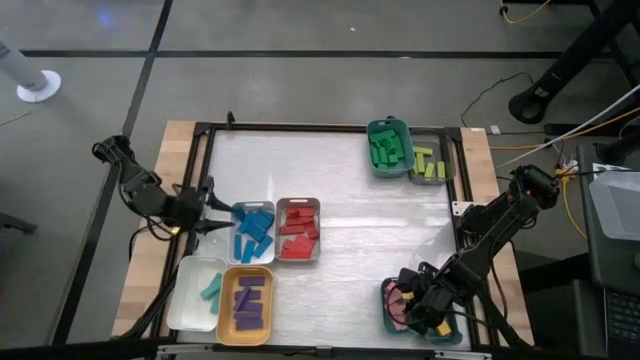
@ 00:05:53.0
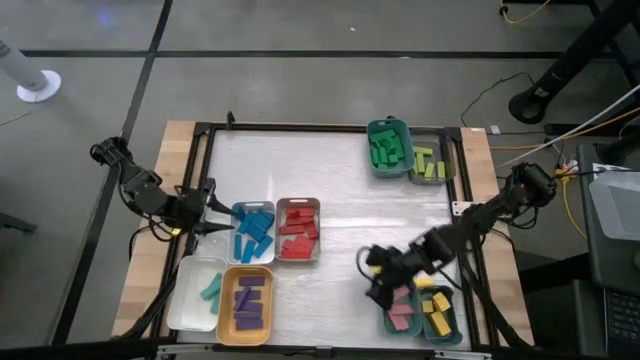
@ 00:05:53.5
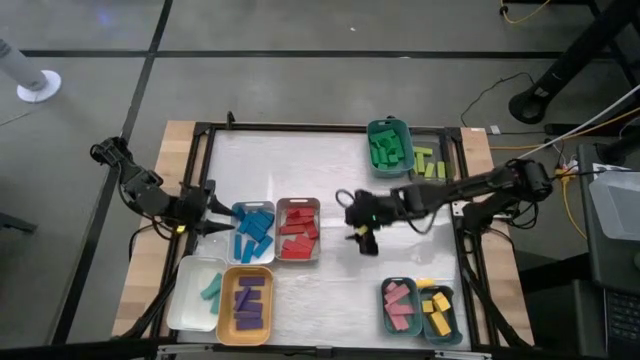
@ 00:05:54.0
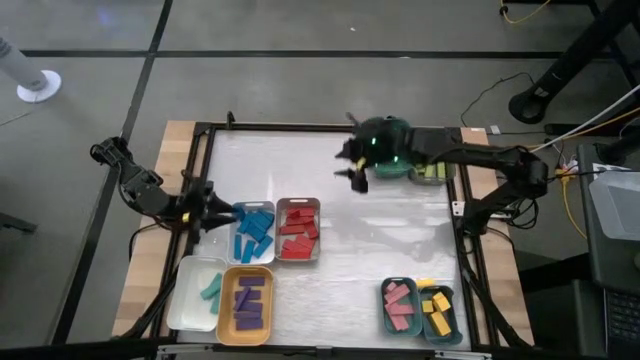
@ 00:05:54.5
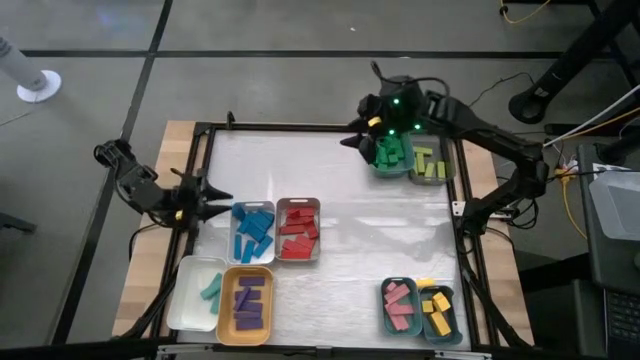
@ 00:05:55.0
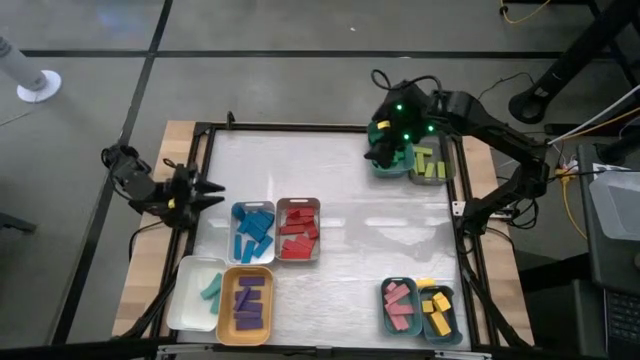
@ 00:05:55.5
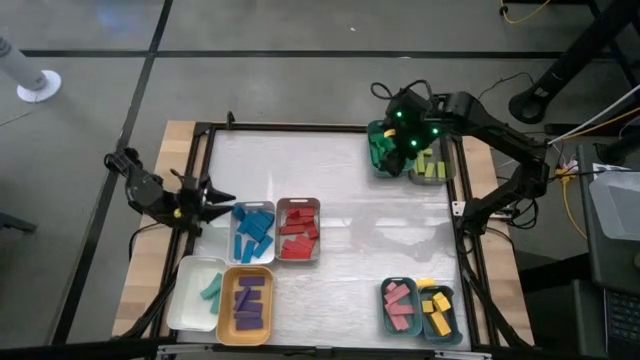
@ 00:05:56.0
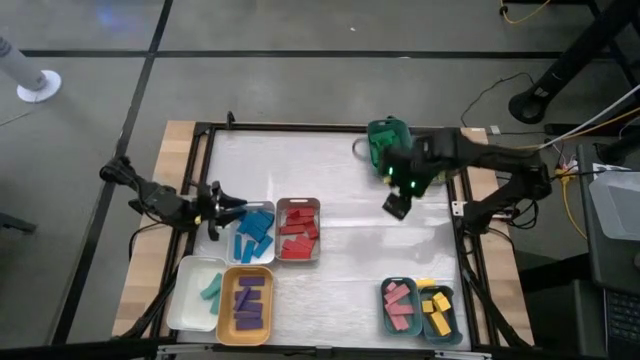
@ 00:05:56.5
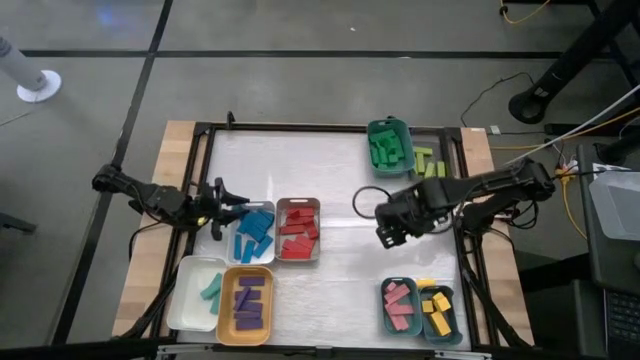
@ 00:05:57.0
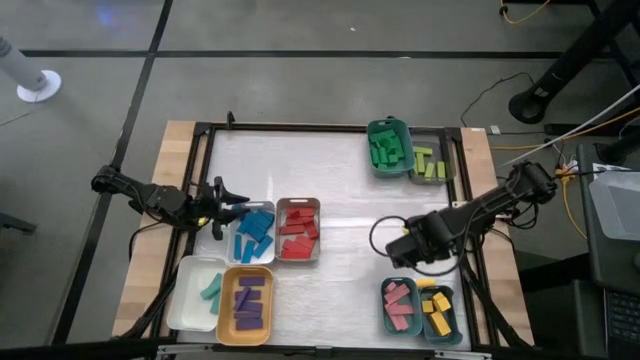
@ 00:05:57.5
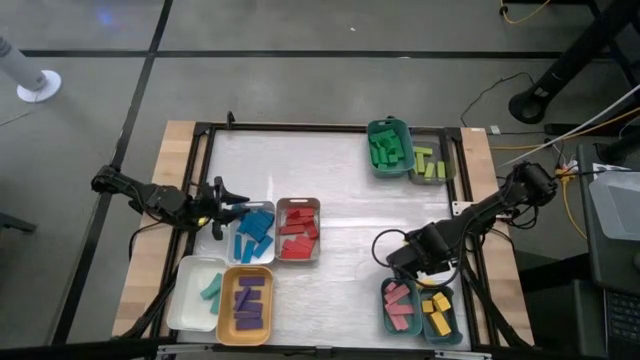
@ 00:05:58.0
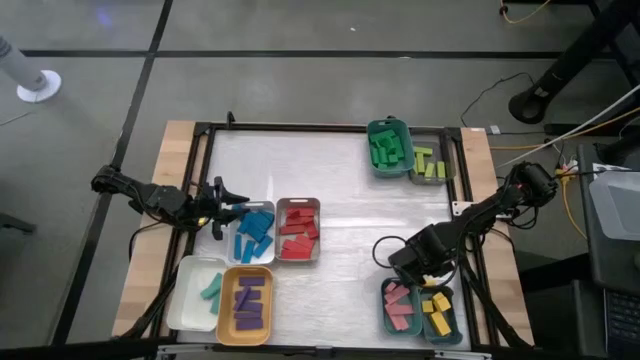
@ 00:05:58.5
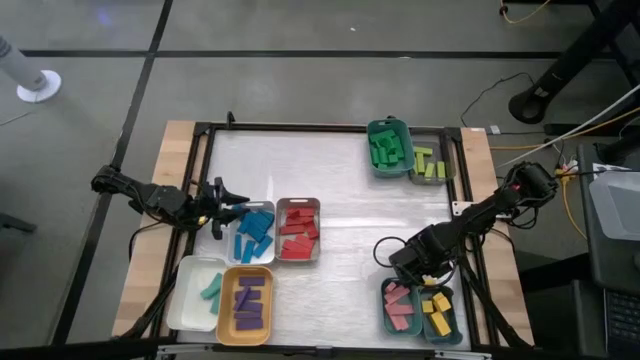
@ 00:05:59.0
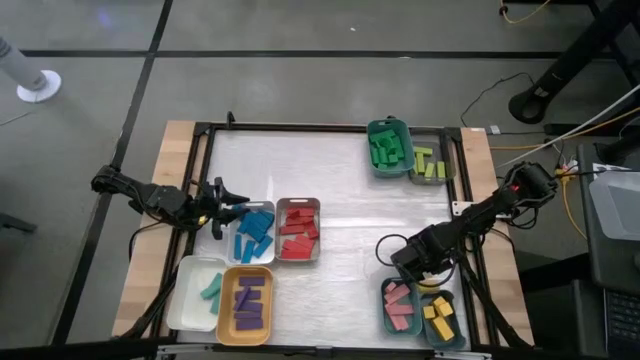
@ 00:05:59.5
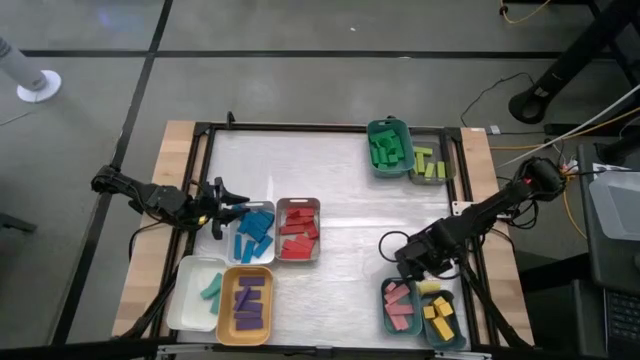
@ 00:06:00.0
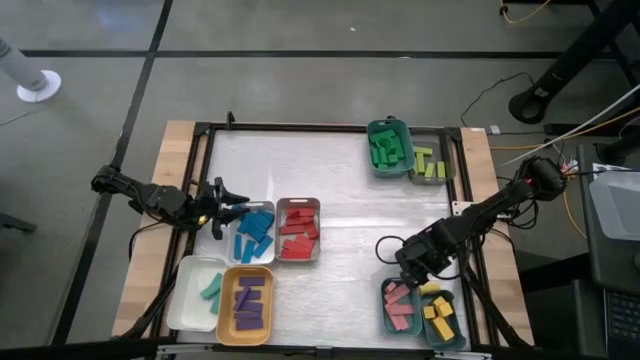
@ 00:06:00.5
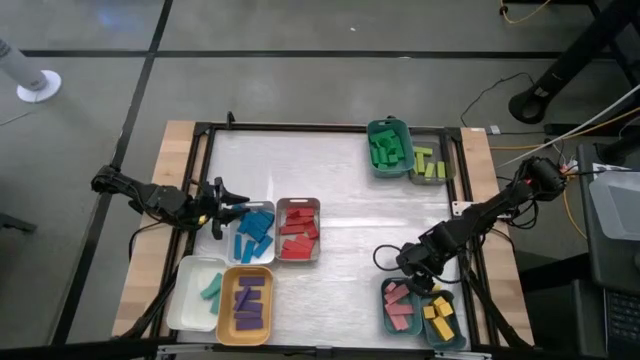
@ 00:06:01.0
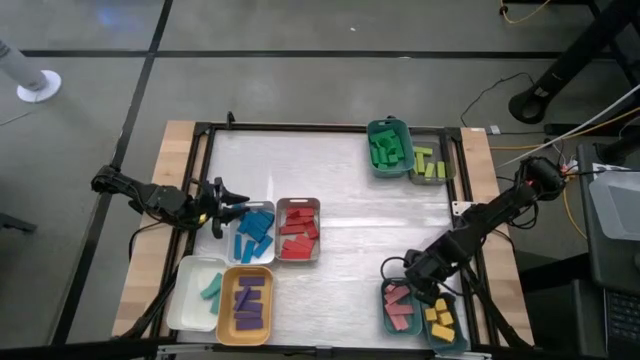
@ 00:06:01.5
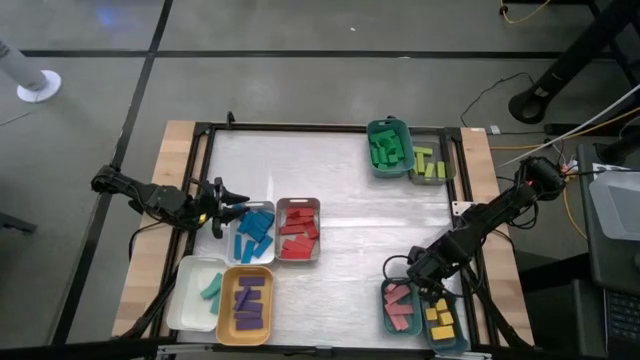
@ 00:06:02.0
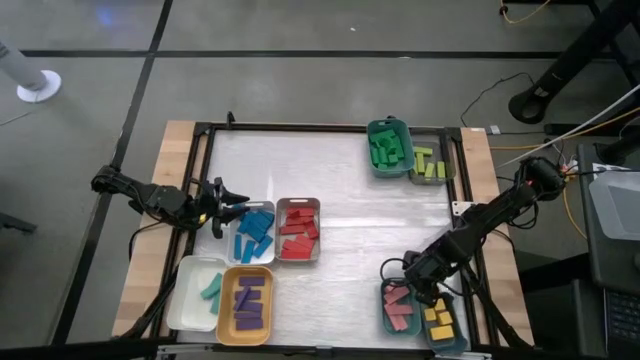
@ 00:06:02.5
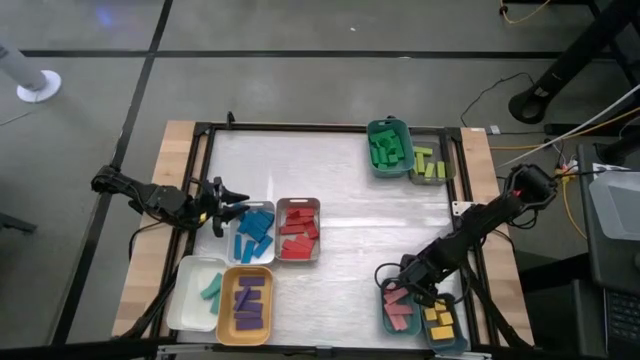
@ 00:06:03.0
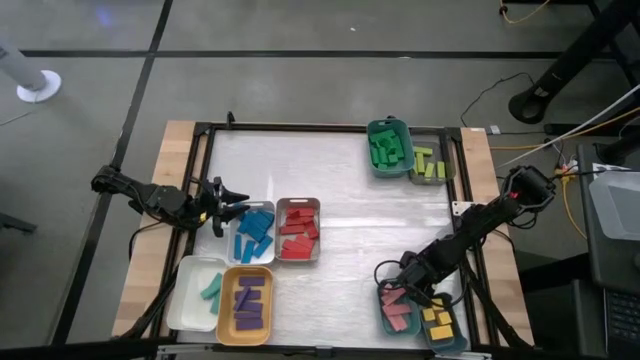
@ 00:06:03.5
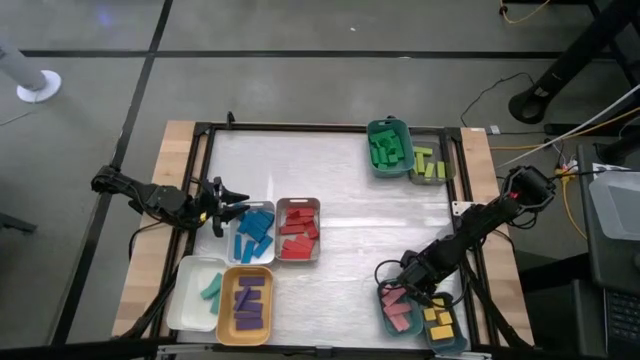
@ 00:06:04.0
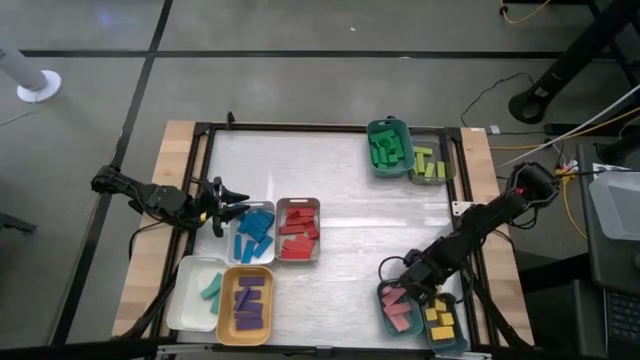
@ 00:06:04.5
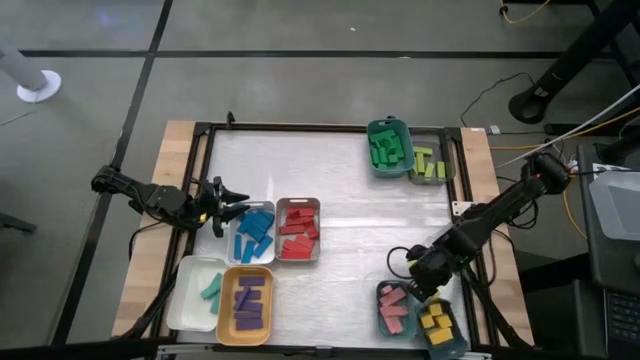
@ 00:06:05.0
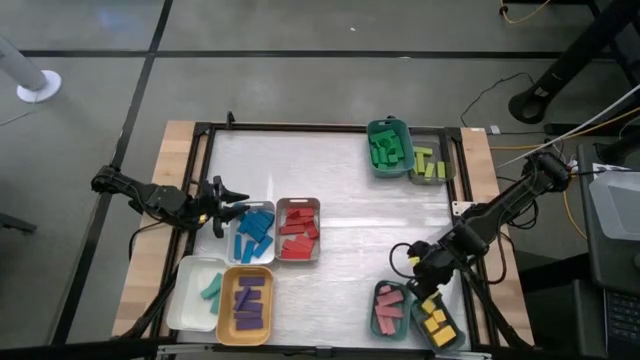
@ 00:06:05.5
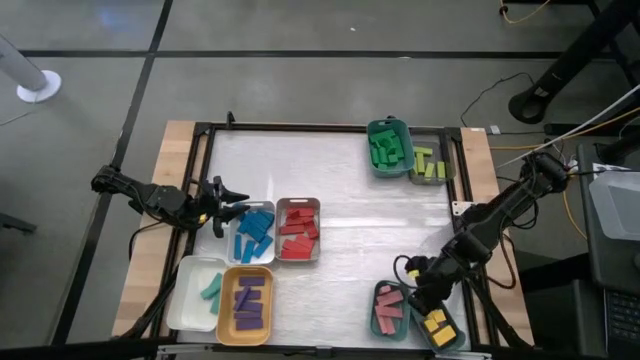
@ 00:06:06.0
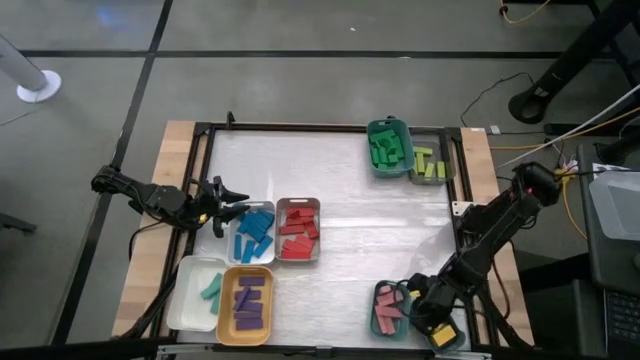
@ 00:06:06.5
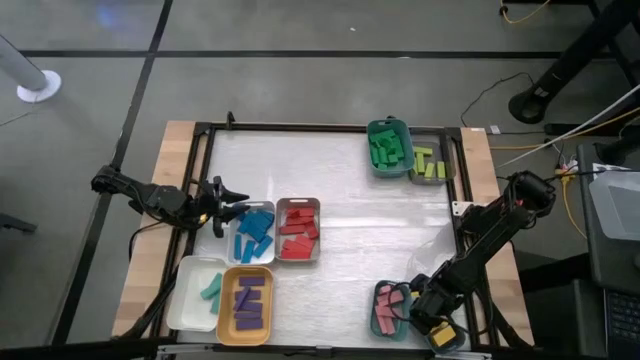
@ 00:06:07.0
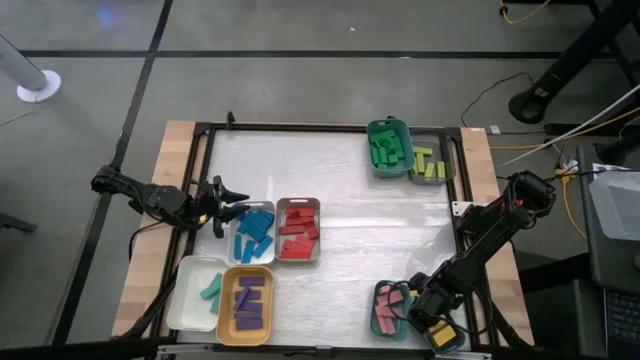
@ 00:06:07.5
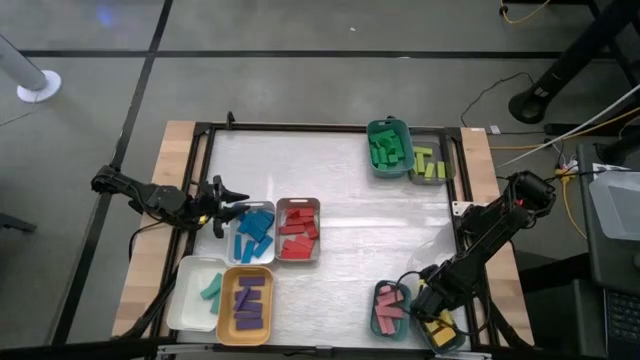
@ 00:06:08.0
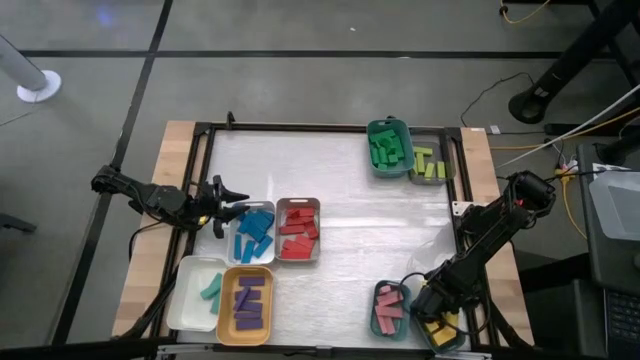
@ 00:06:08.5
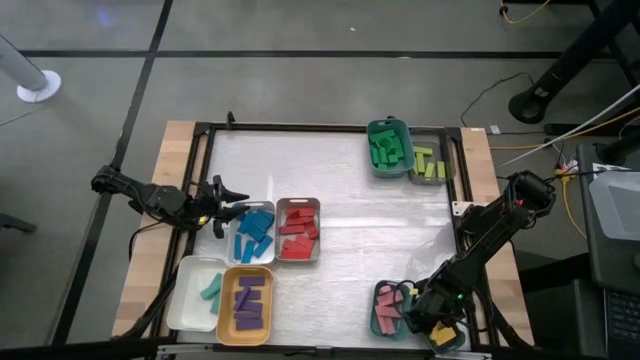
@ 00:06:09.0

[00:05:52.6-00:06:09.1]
Task: Sort blocks
Put the yellow block into the dark blue bin

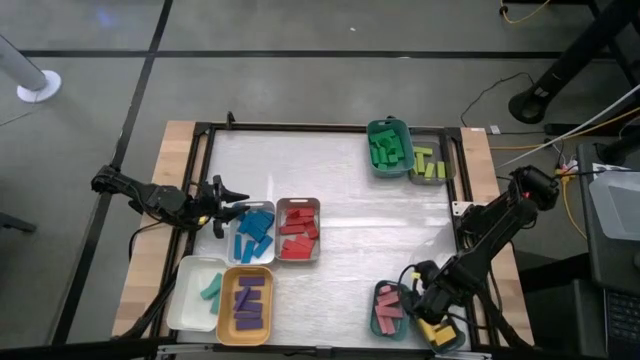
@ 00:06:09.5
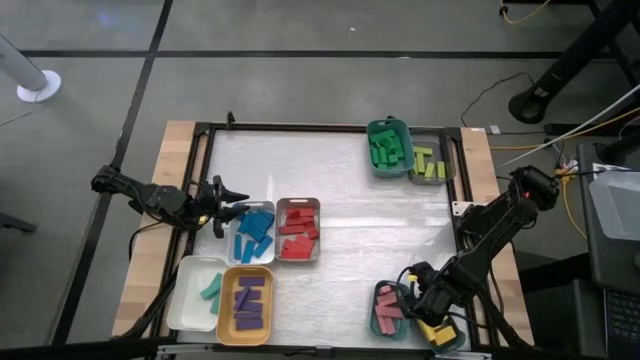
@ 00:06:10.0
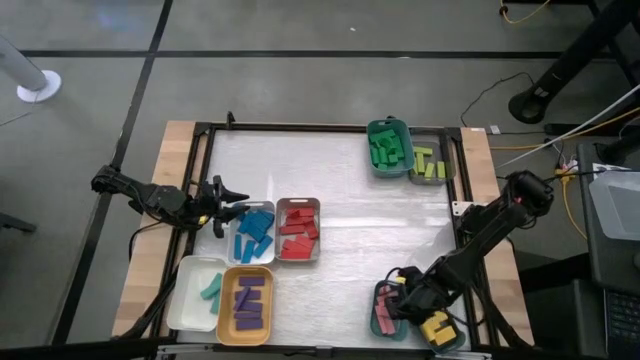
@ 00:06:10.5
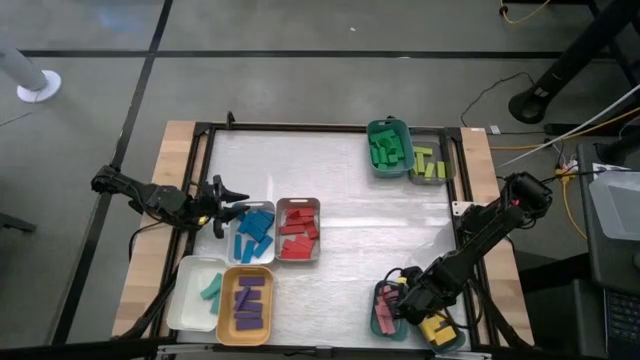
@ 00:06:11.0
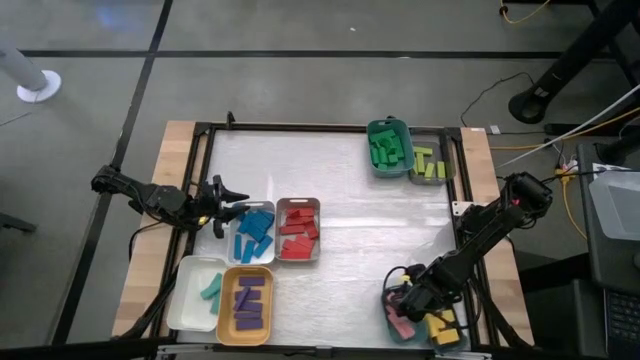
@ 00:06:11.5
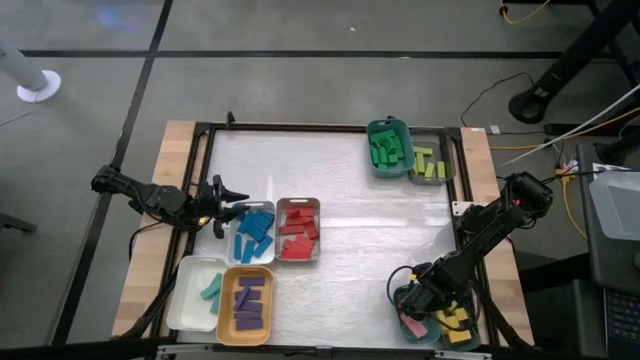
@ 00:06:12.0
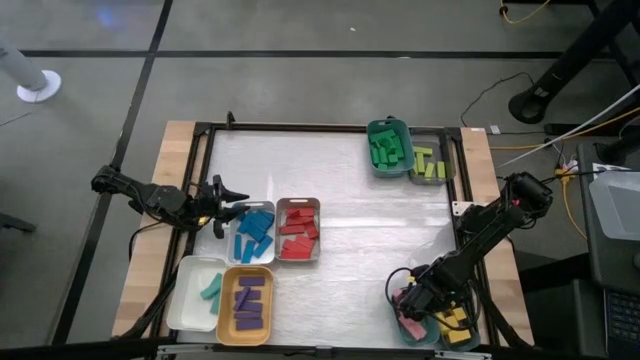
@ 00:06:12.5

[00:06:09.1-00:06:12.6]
Adjust the bottom green bin and the dark blue bin on the table

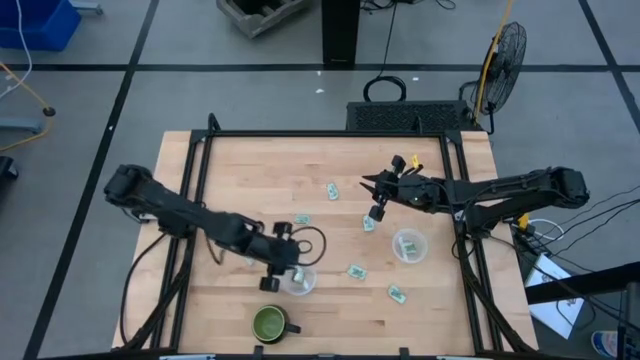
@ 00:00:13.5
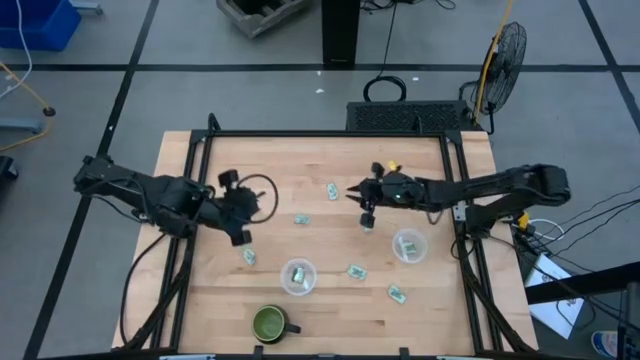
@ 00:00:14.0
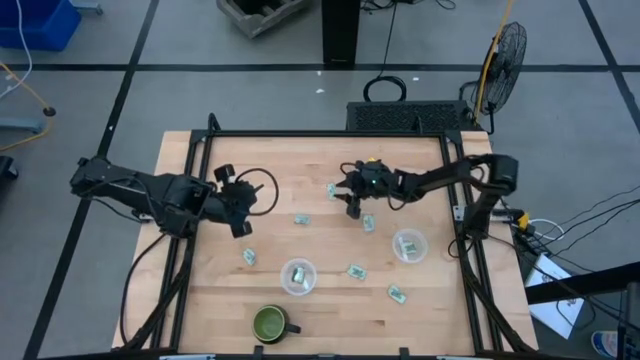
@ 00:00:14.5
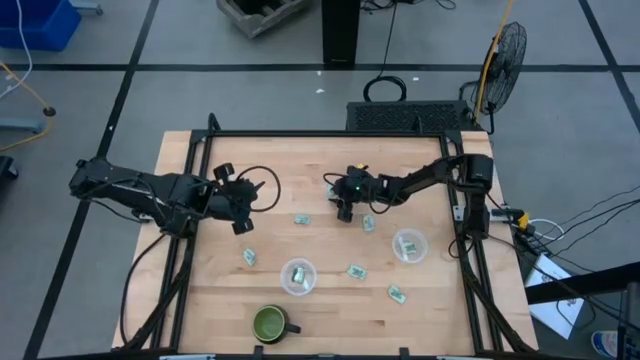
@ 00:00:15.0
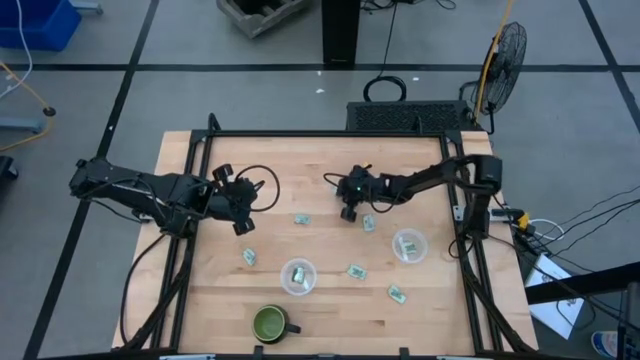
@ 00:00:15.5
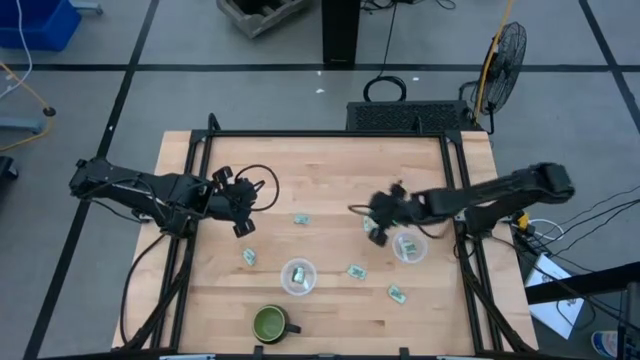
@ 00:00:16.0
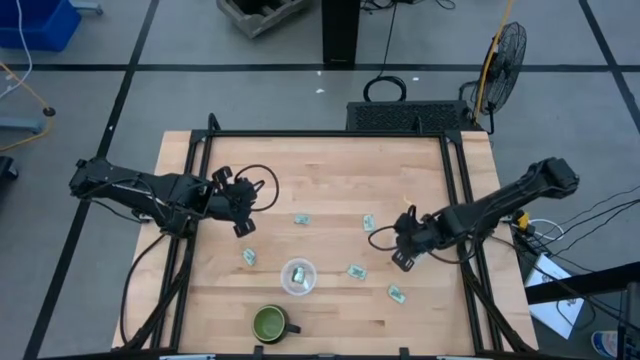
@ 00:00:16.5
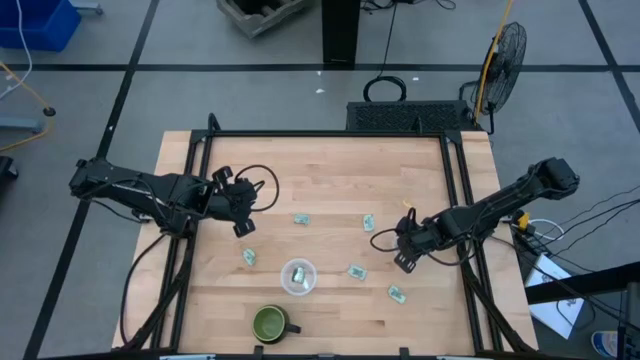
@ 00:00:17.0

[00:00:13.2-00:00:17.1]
Task: Pick and place Stevia / Truvia into bins
Put the white stevia packet into the right transparent container
